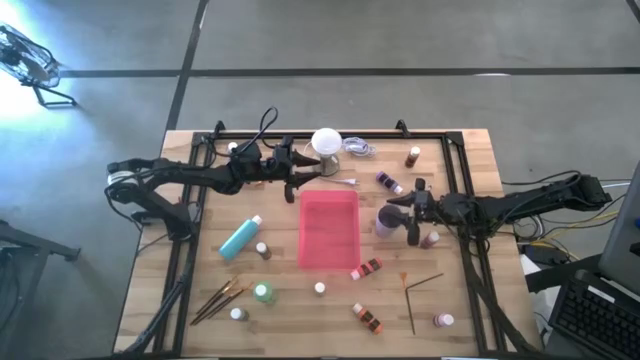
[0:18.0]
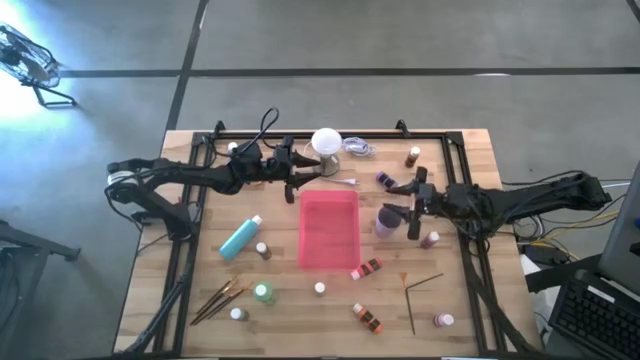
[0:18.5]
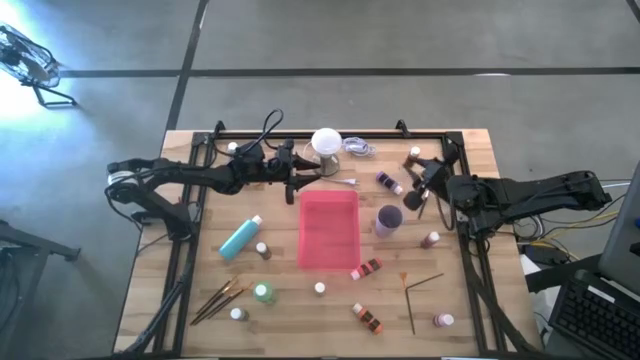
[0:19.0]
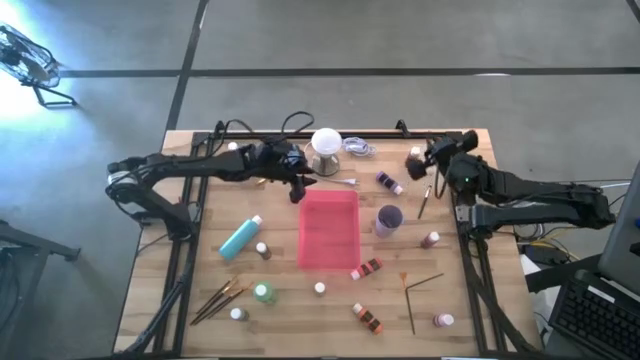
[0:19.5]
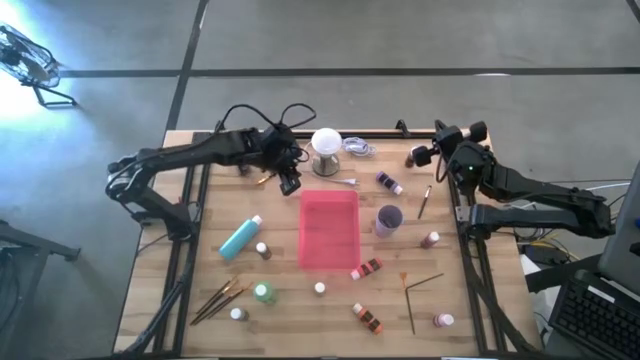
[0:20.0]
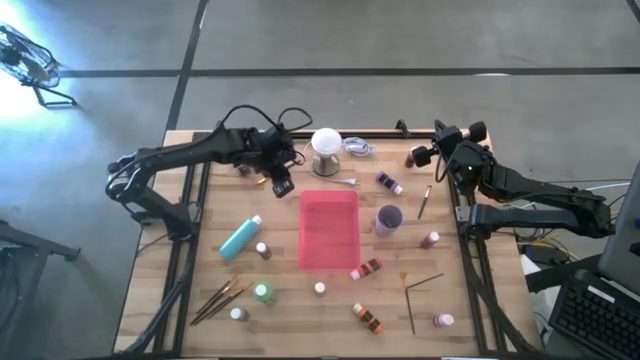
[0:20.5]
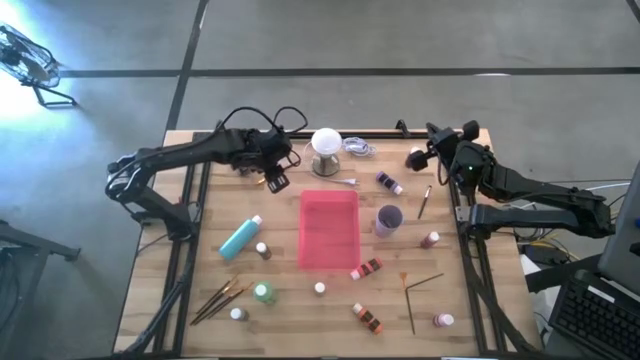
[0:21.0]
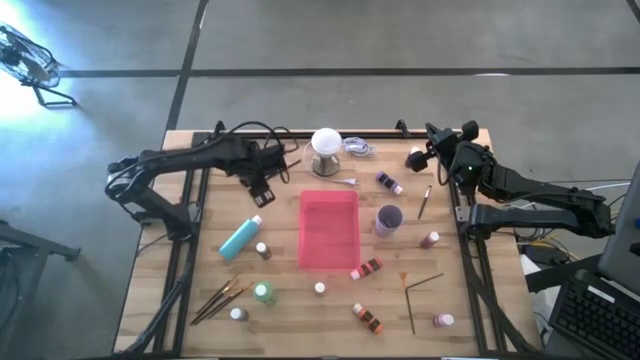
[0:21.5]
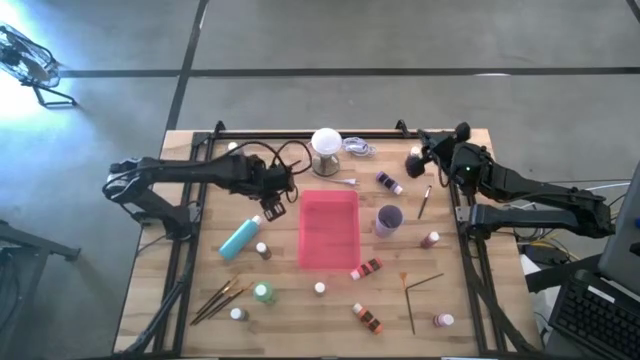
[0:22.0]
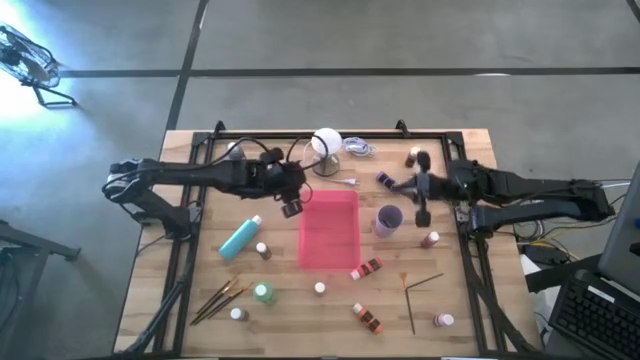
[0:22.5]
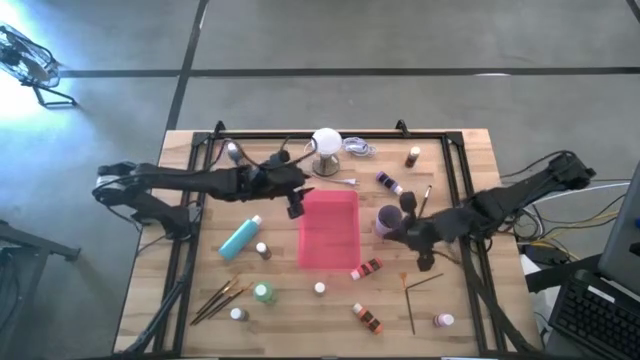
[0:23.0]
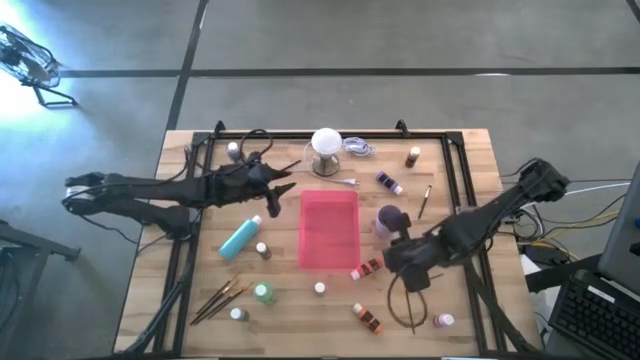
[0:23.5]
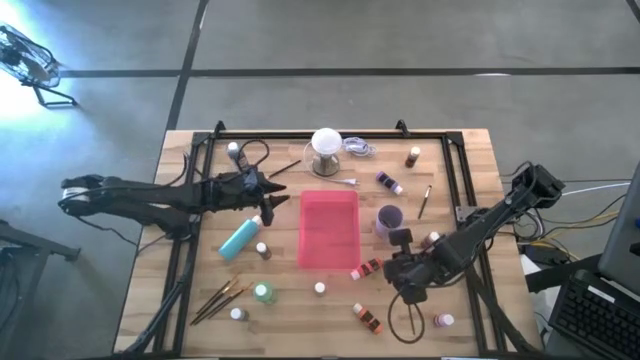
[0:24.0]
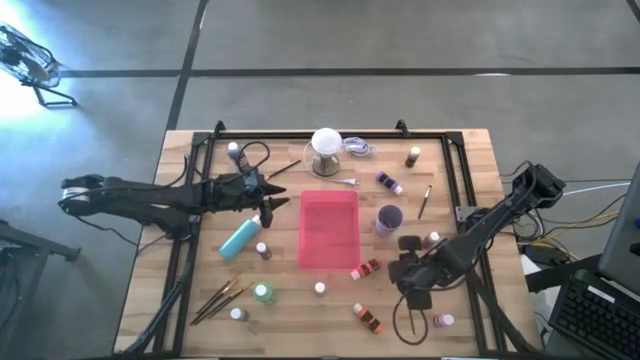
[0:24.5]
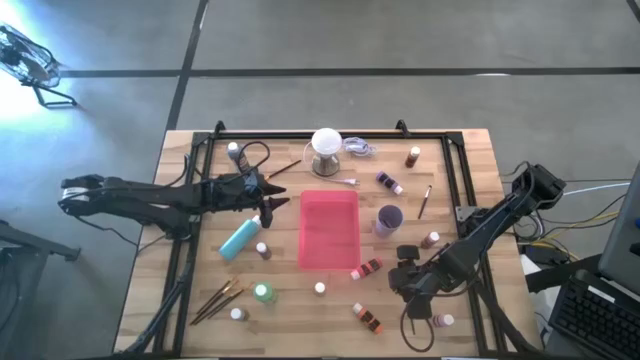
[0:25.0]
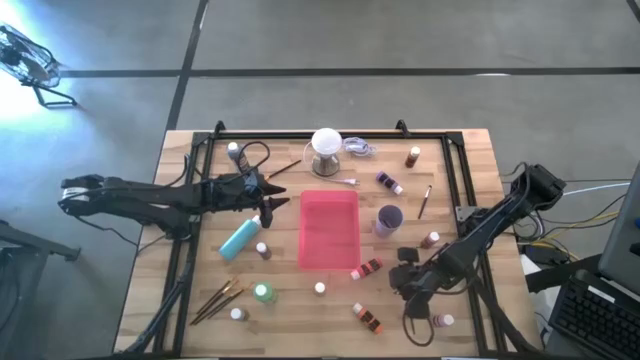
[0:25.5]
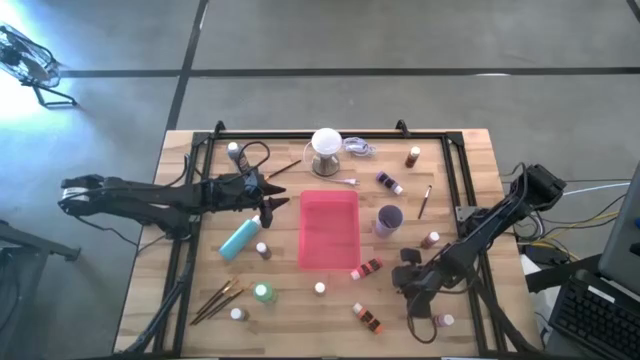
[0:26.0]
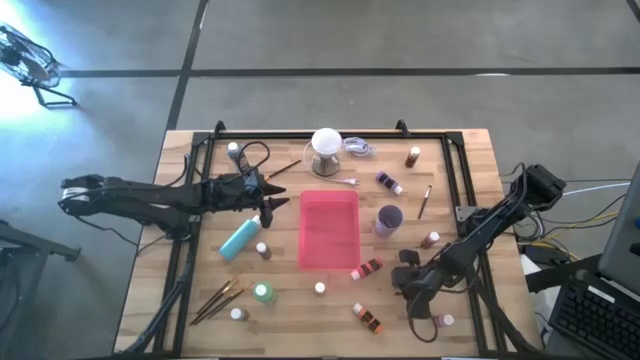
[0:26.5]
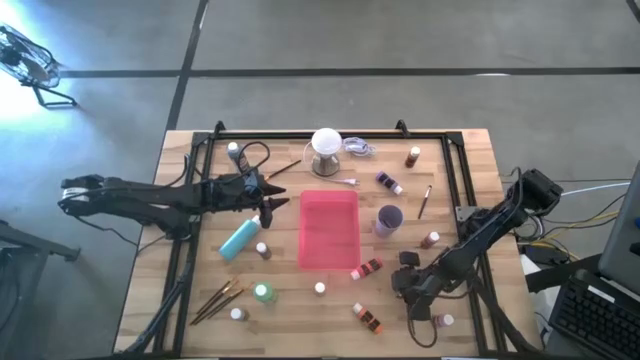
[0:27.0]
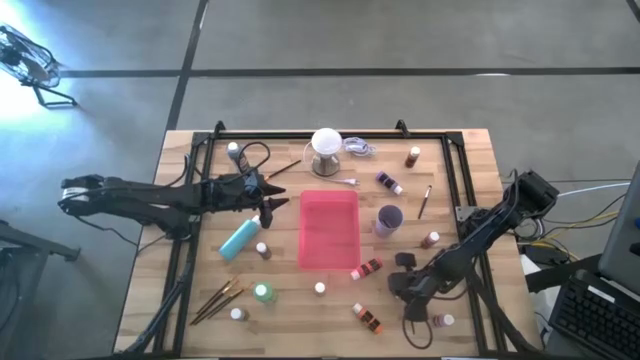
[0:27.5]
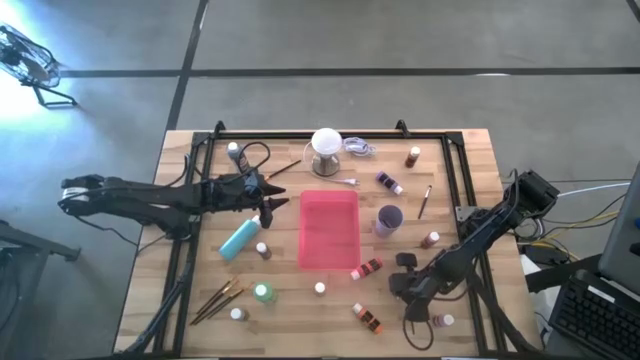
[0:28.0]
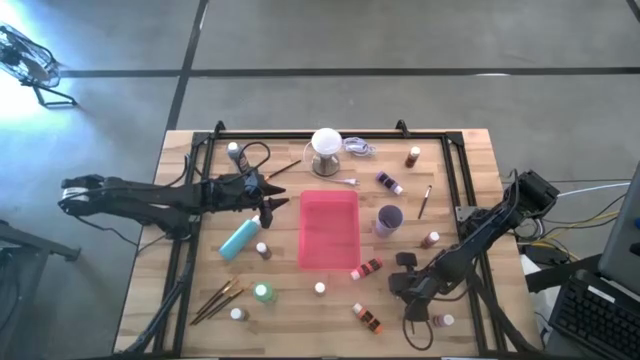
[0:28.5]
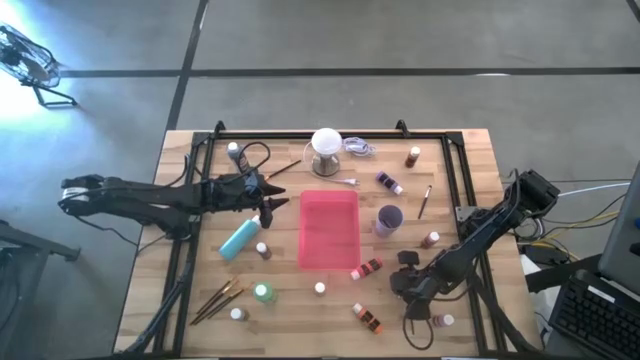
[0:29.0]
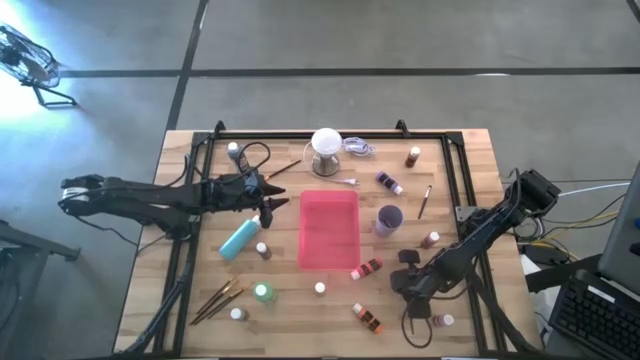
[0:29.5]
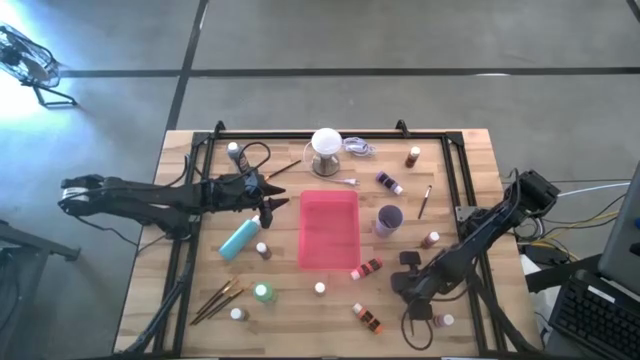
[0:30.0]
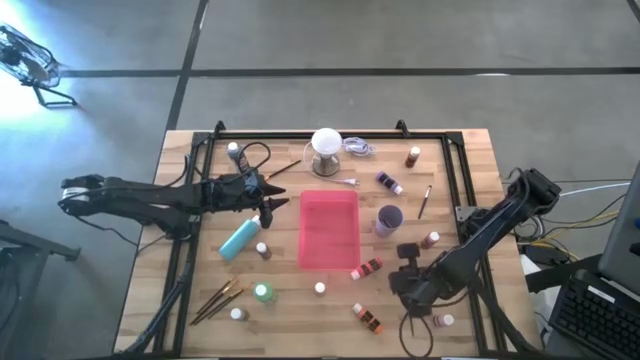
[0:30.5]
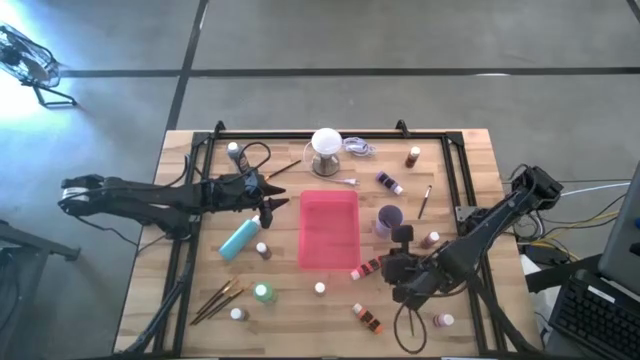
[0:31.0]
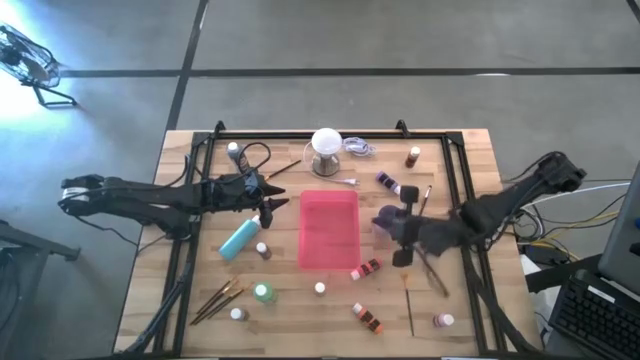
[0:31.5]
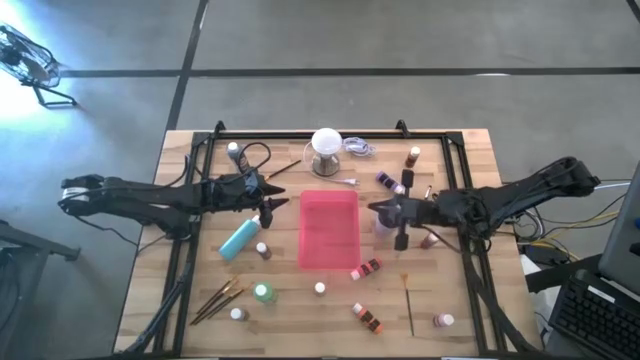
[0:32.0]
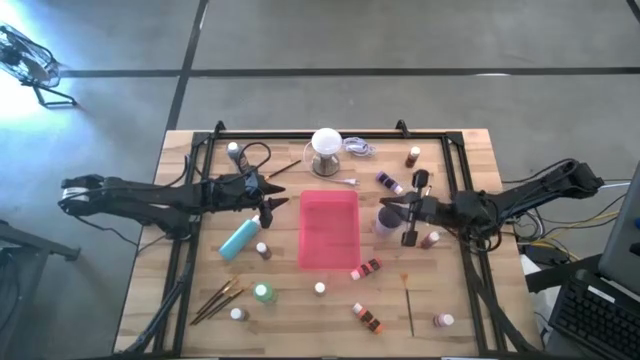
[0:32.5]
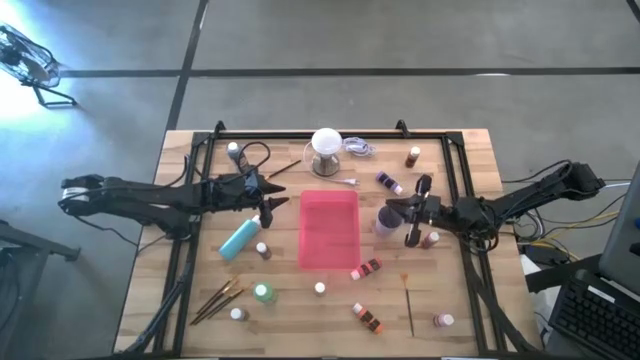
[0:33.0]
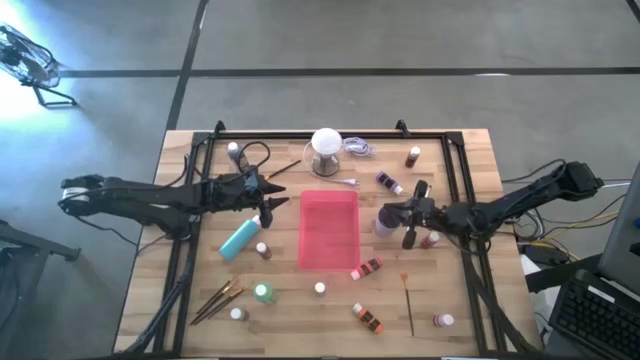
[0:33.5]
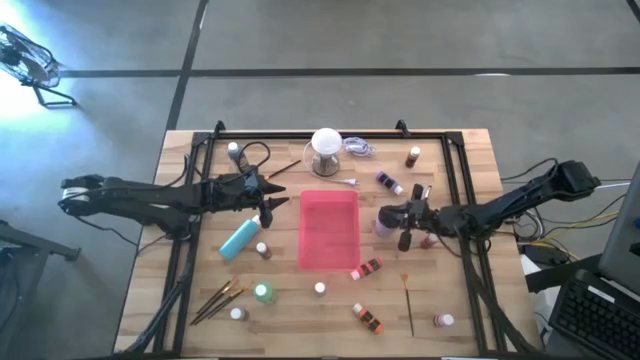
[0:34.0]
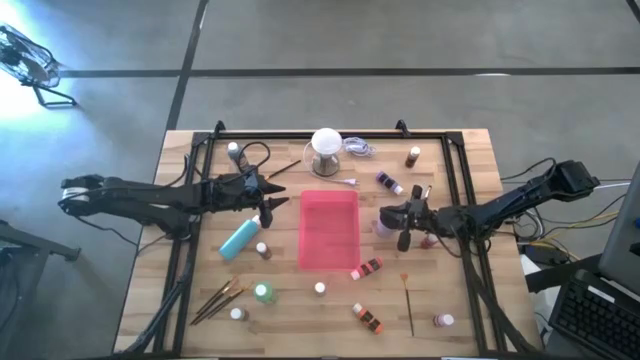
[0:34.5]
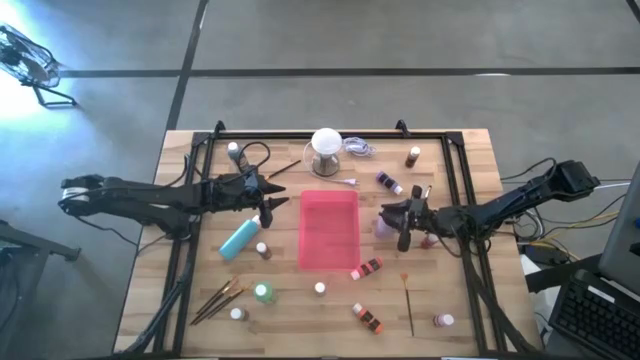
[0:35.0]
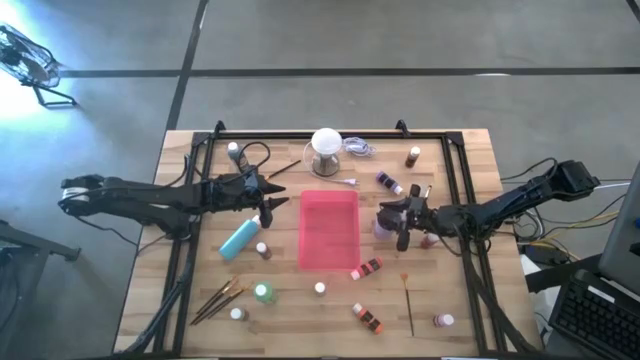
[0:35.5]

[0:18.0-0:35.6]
Task: Pick & Place Paint Supplies
Put the orange paintbrush into the purple cup
